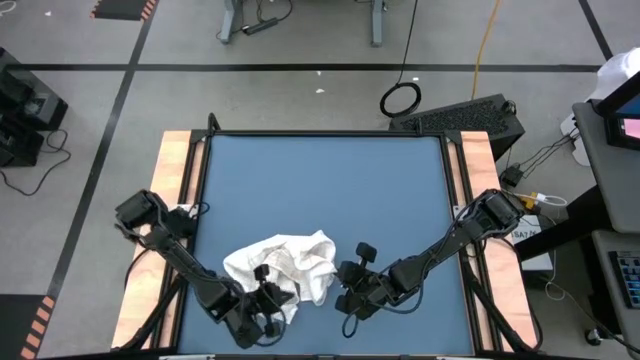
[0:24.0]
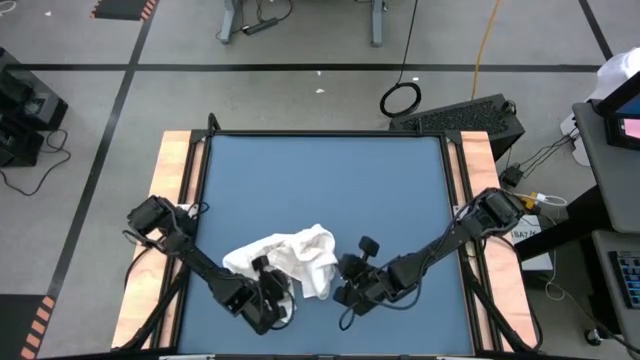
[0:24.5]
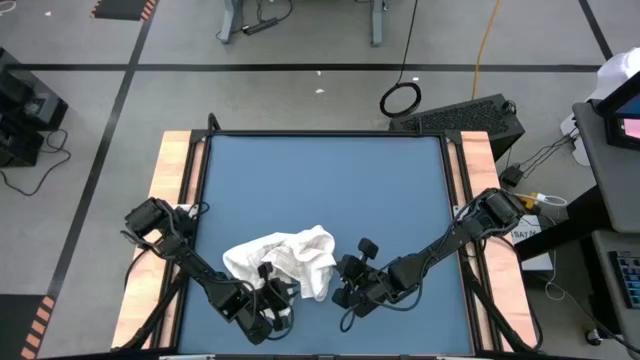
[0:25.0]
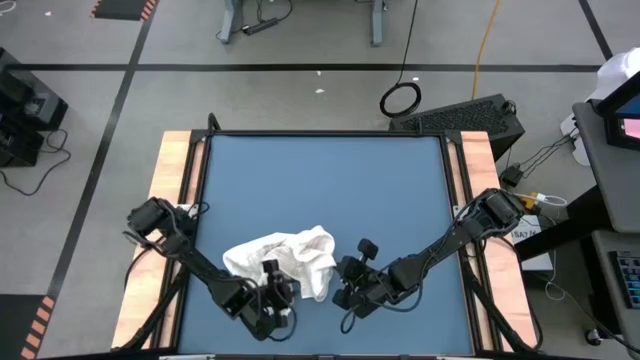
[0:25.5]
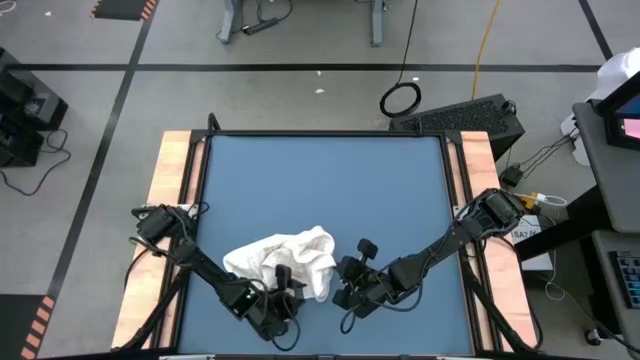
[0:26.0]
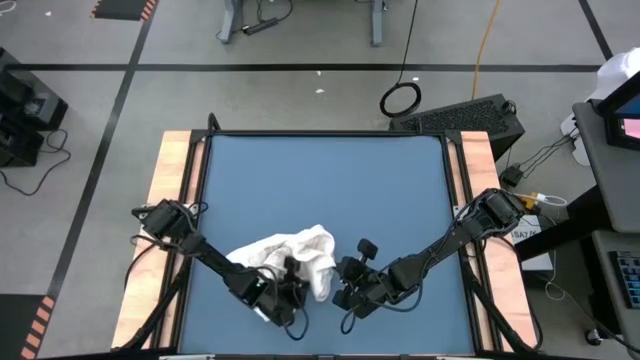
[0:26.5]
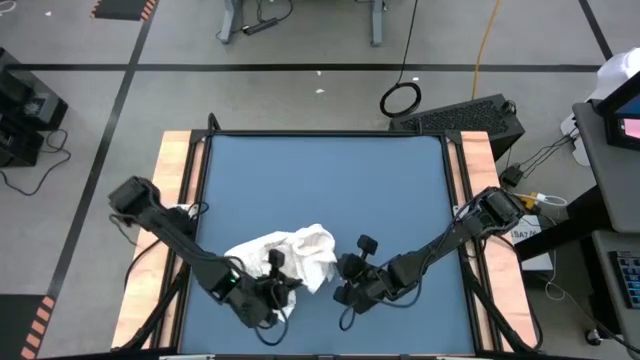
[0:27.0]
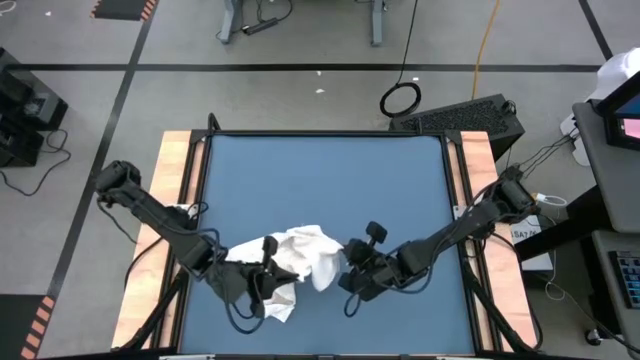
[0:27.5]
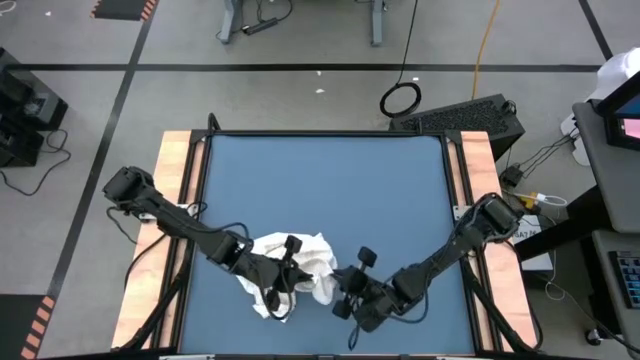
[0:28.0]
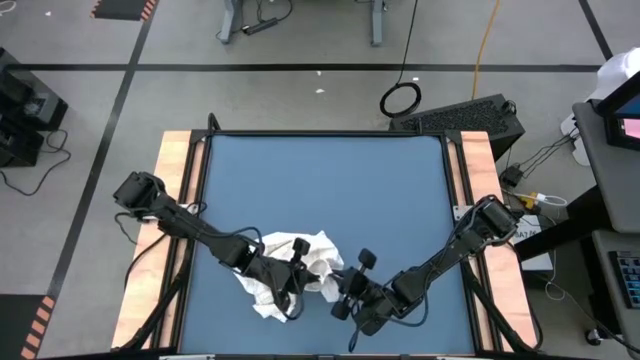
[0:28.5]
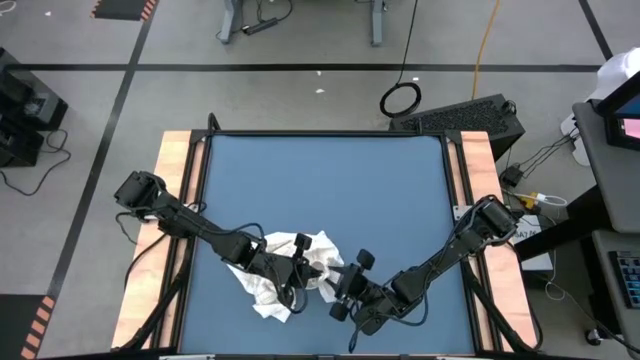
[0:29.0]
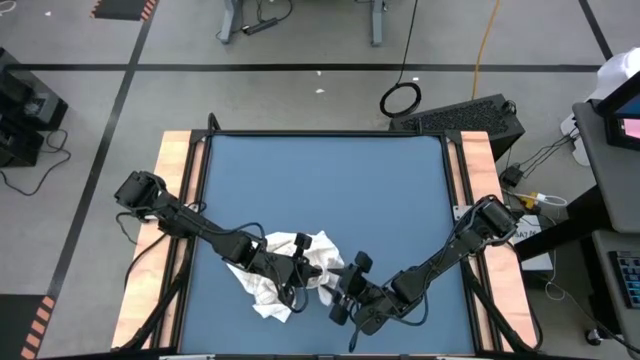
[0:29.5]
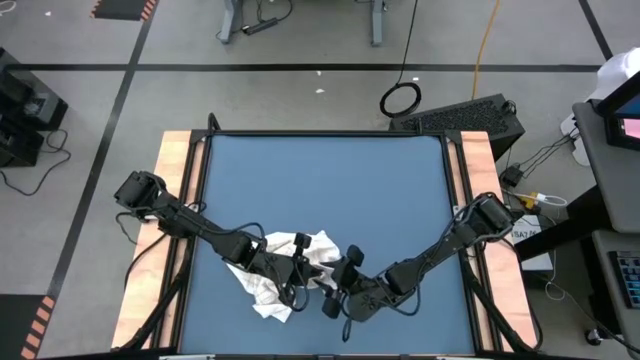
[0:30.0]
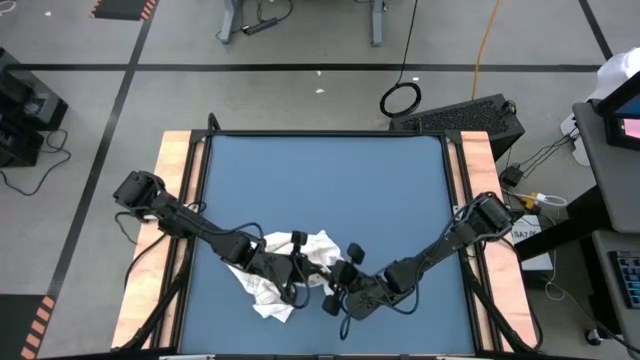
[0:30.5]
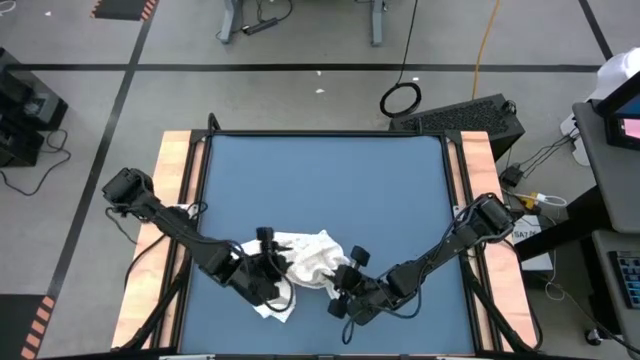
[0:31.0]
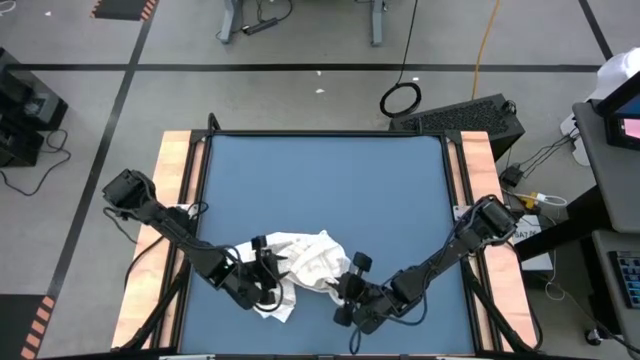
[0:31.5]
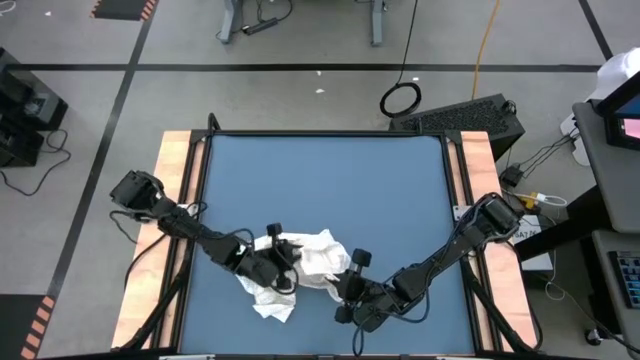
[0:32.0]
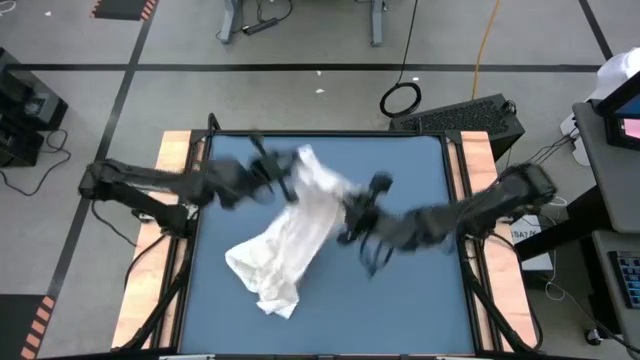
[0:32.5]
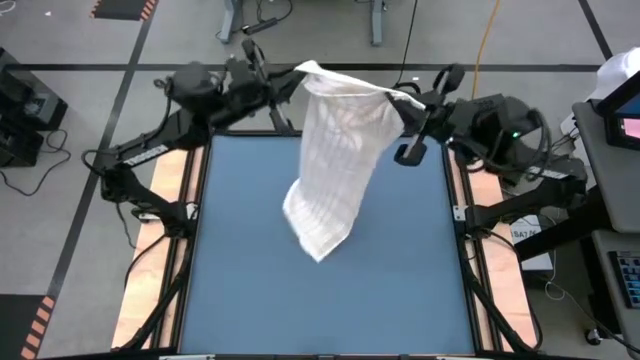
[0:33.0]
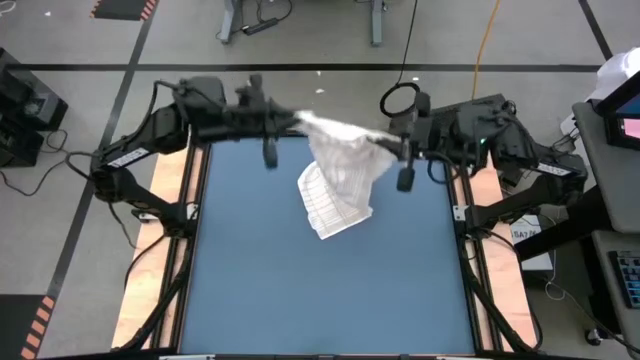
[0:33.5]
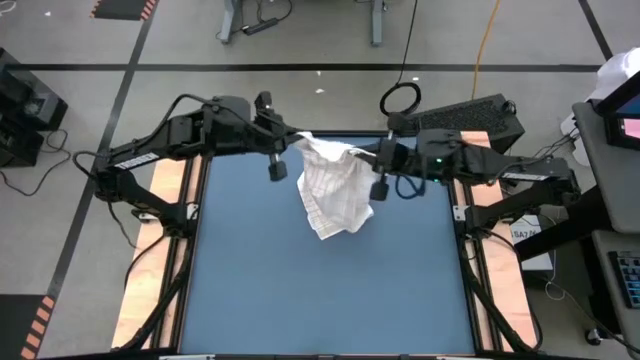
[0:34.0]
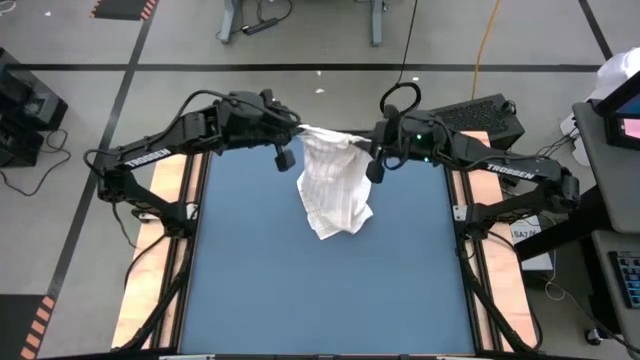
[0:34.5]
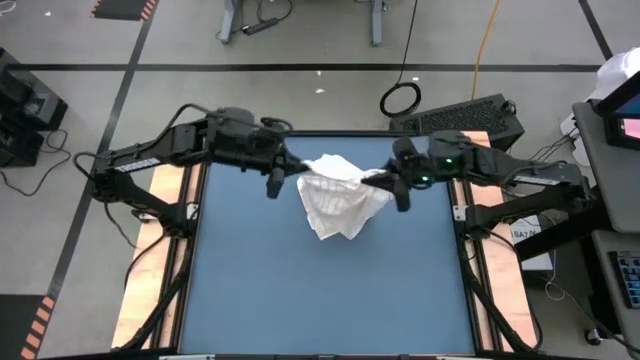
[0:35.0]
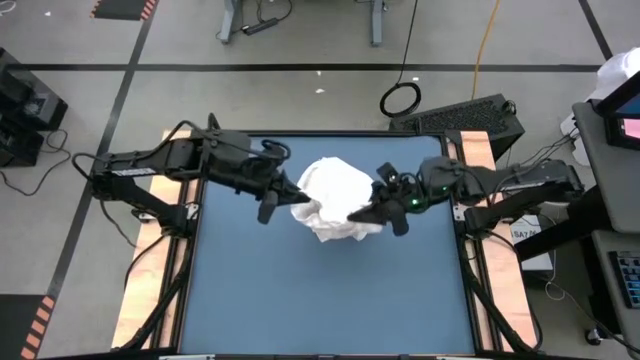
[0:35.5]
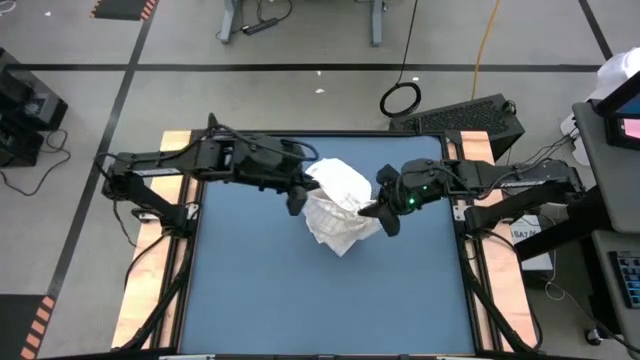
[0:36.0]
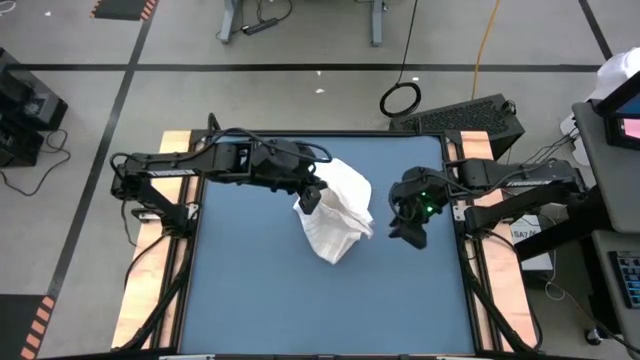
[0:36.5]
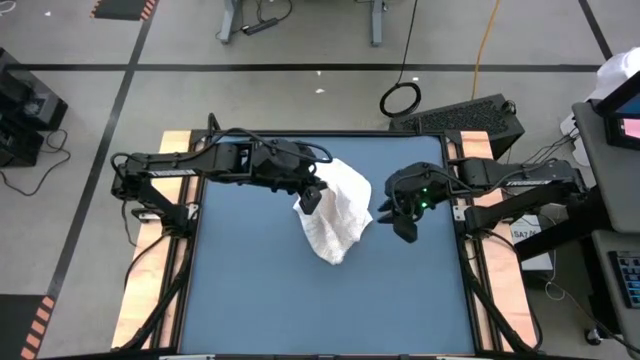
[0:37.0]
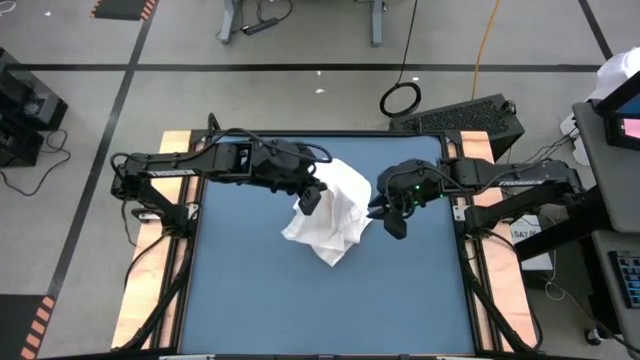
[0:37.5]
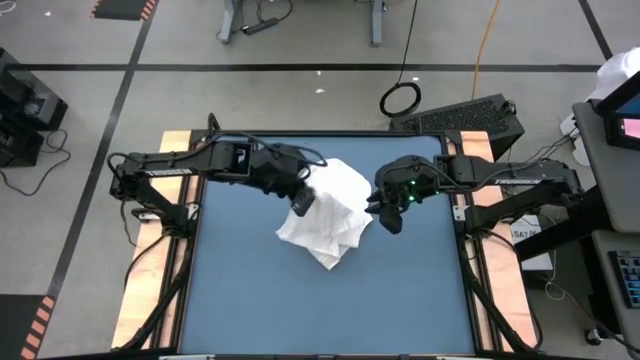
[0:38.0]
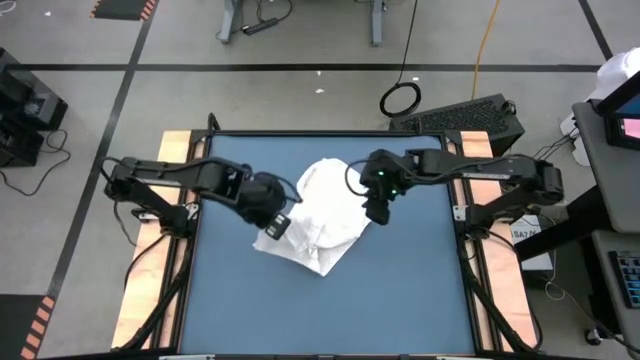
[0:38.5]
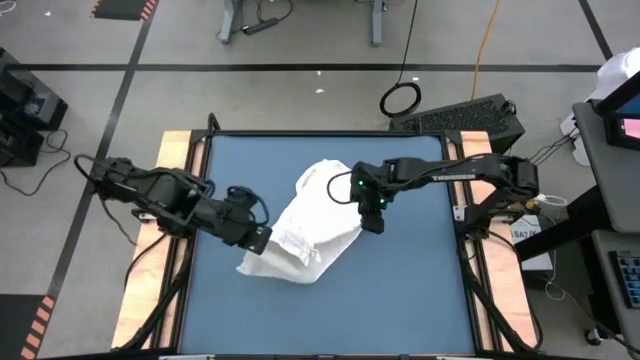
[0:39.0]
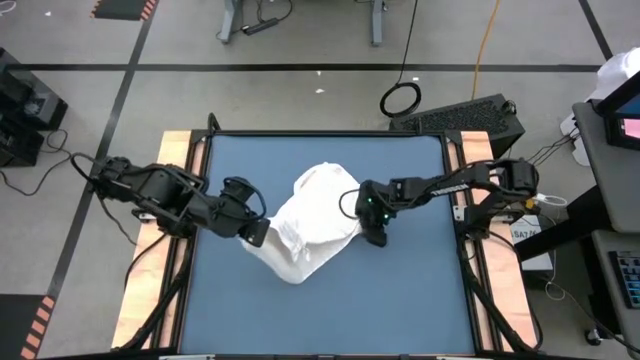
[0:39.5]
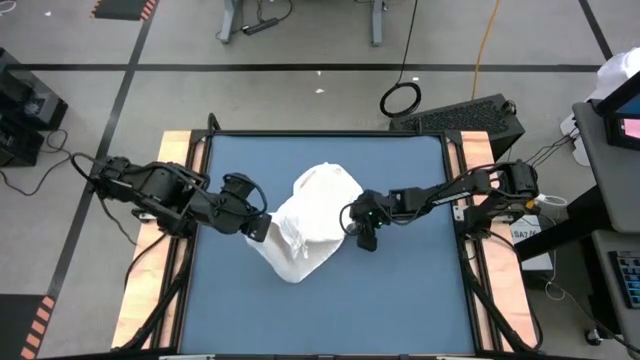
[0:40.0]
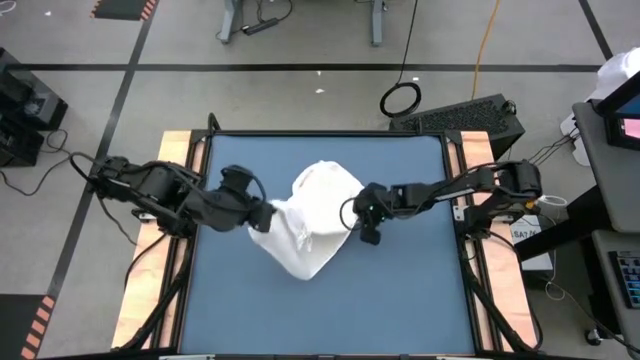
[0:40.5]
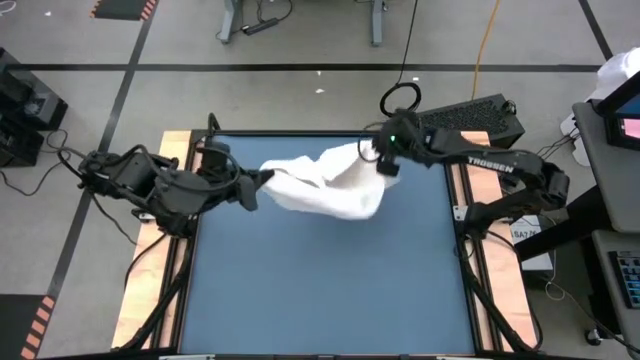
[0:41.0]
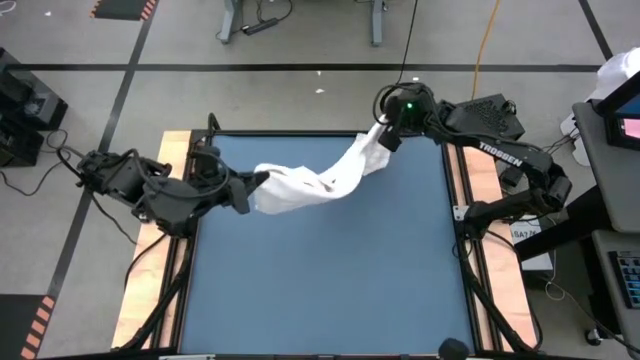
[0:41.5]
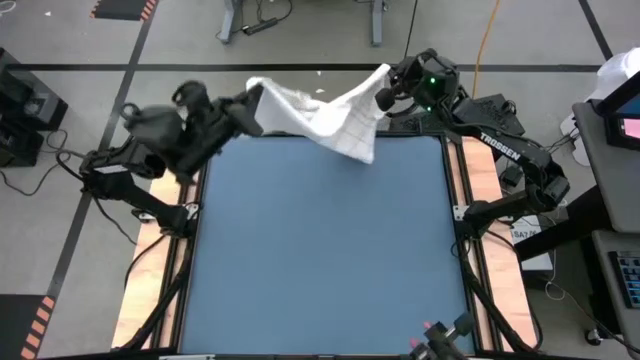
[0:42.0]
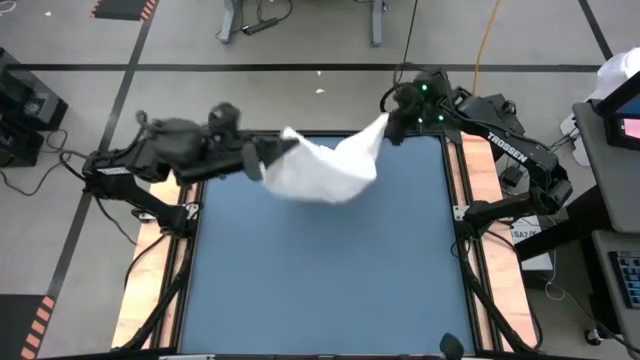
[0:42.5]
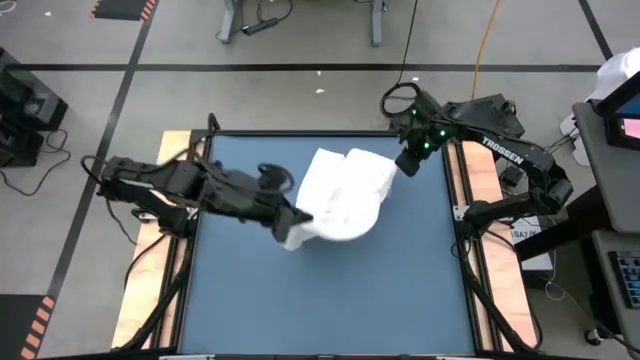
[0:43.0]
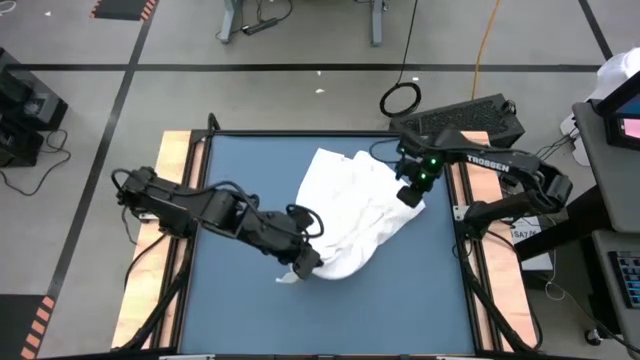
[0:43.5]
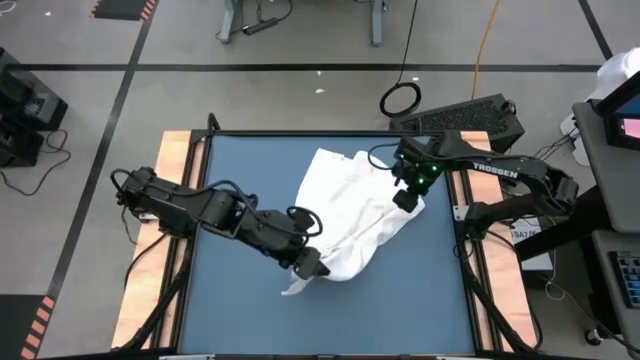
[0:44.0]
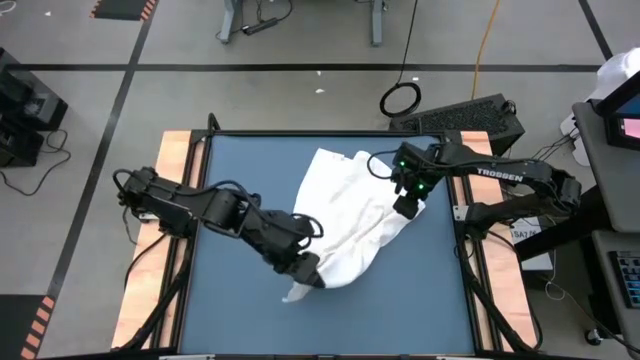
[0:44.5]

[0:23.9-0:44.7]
Task: Roll towel into tight, uniform cylinder
Roll the white towel
